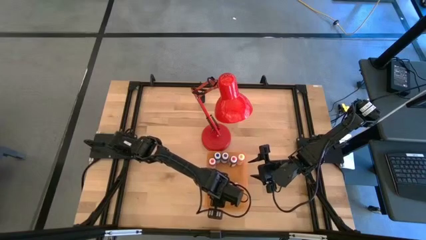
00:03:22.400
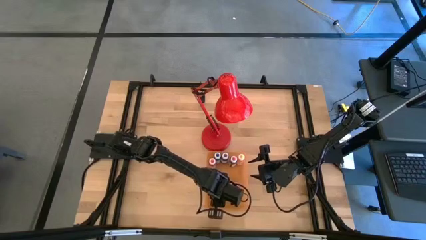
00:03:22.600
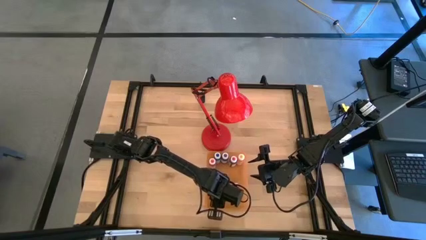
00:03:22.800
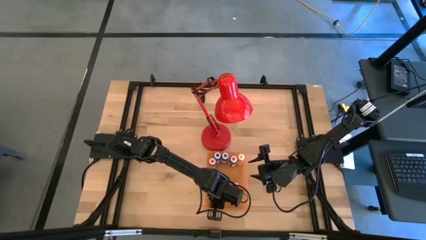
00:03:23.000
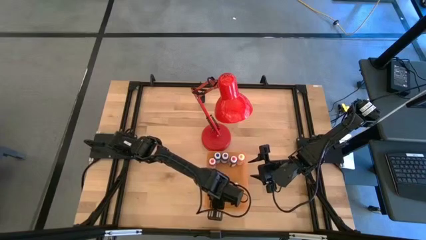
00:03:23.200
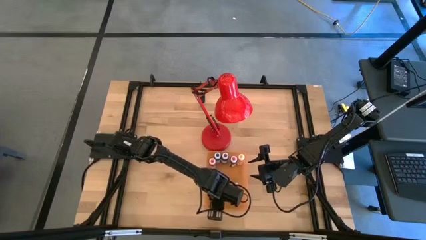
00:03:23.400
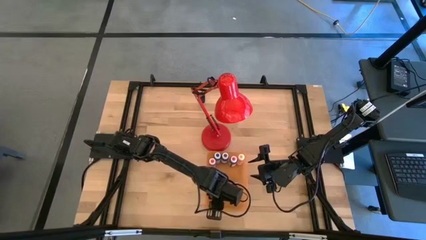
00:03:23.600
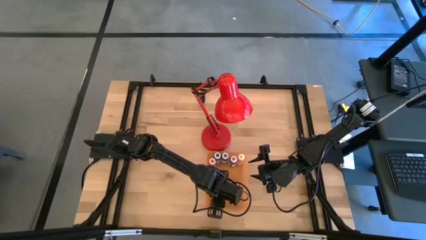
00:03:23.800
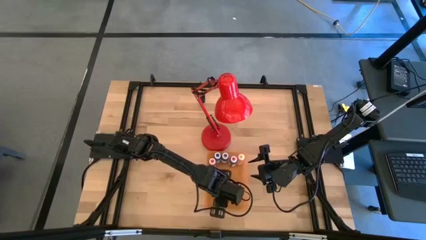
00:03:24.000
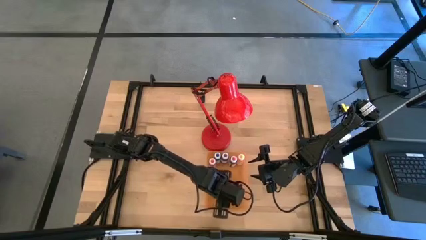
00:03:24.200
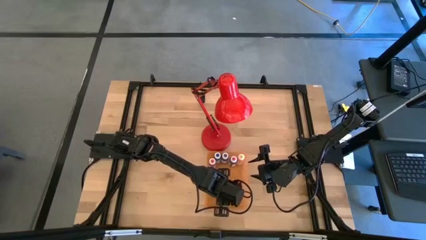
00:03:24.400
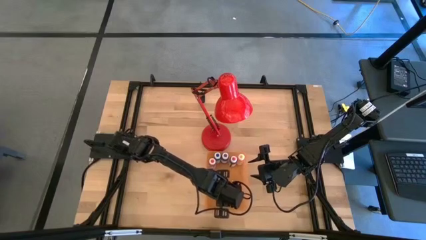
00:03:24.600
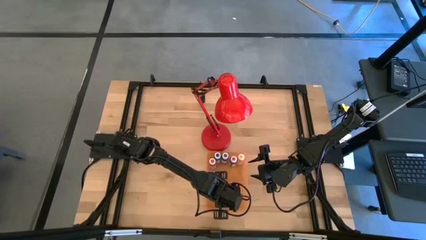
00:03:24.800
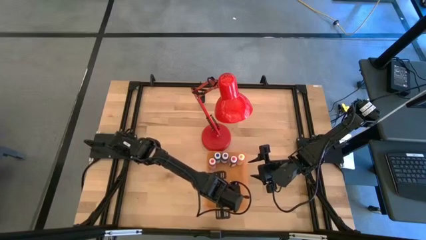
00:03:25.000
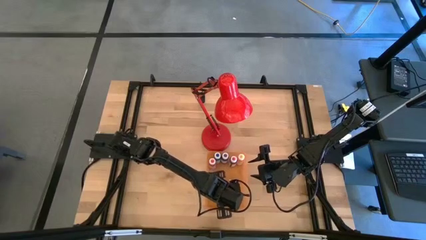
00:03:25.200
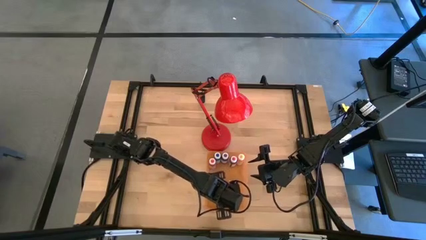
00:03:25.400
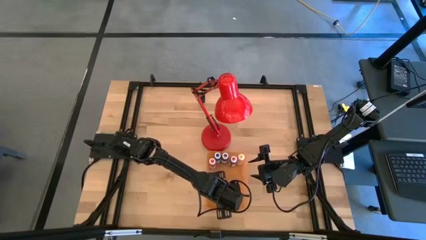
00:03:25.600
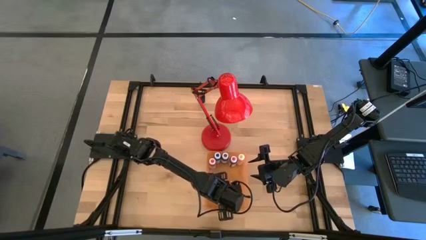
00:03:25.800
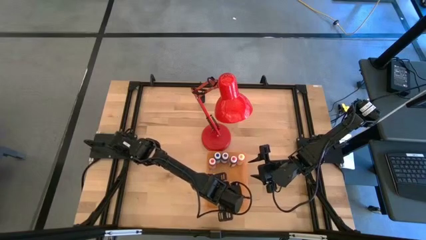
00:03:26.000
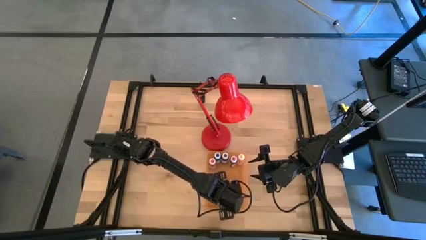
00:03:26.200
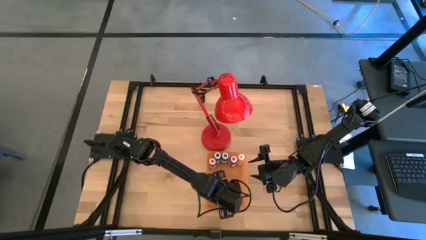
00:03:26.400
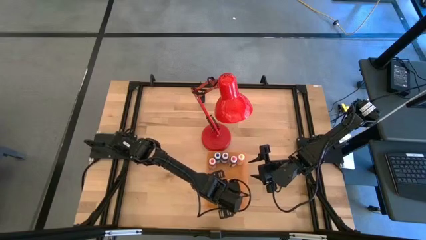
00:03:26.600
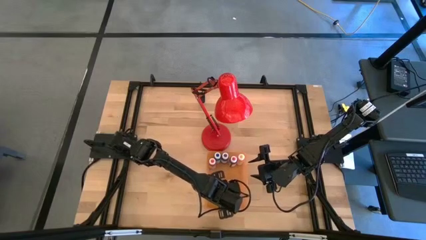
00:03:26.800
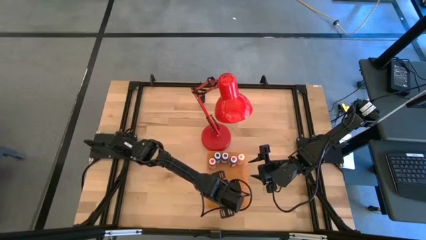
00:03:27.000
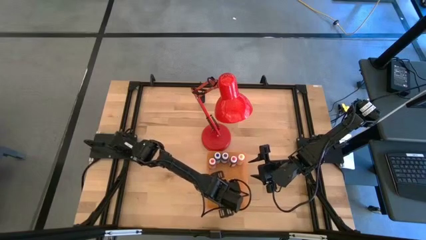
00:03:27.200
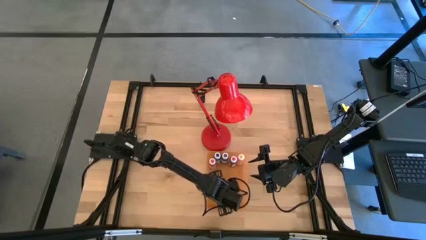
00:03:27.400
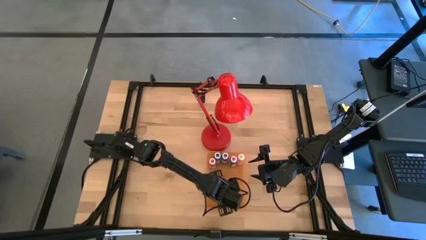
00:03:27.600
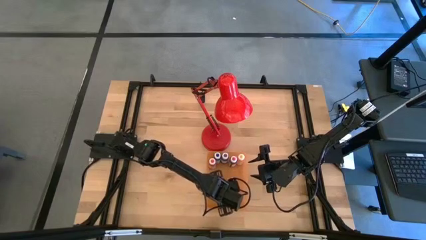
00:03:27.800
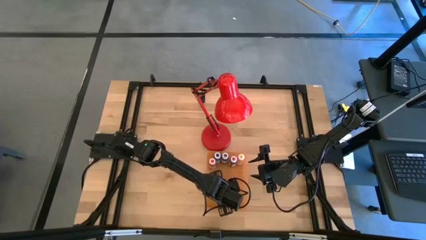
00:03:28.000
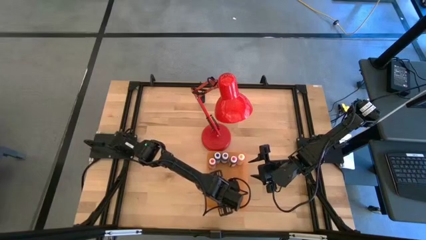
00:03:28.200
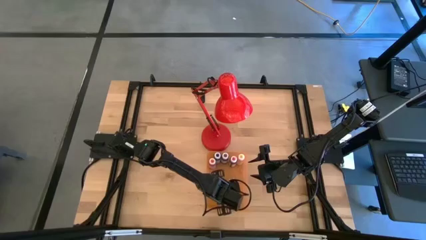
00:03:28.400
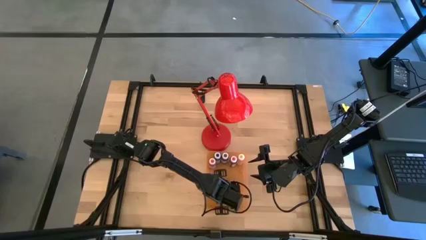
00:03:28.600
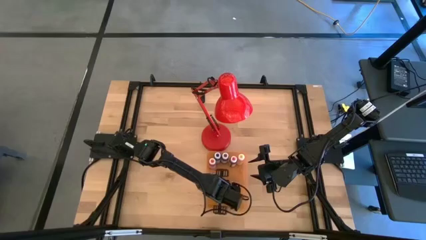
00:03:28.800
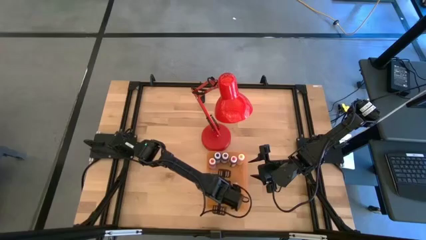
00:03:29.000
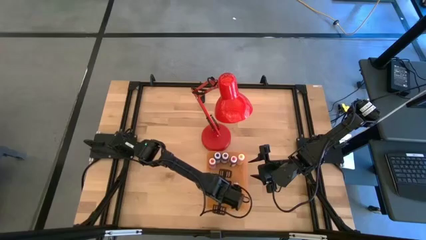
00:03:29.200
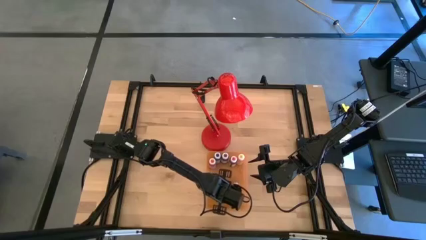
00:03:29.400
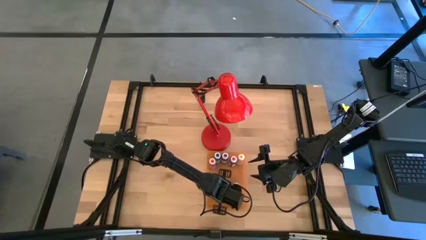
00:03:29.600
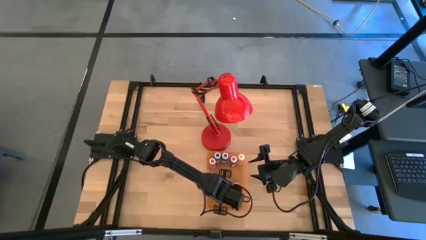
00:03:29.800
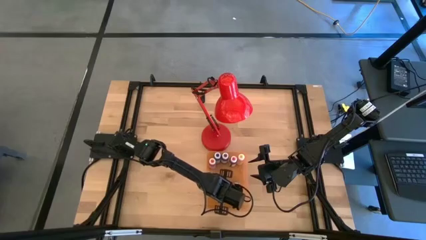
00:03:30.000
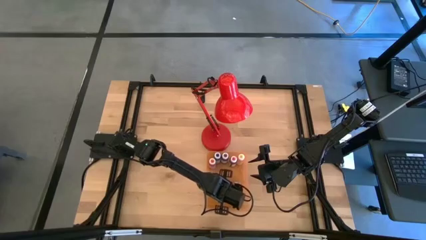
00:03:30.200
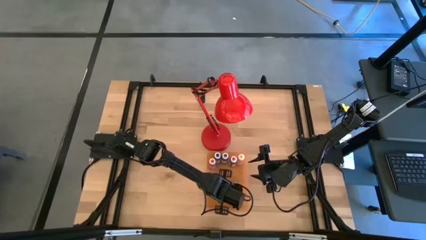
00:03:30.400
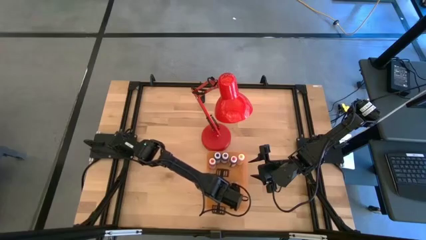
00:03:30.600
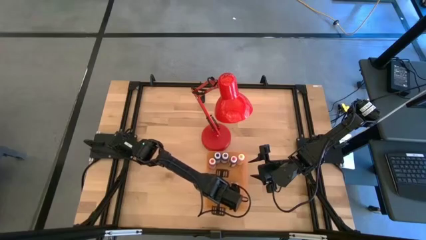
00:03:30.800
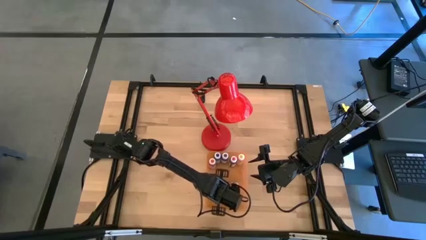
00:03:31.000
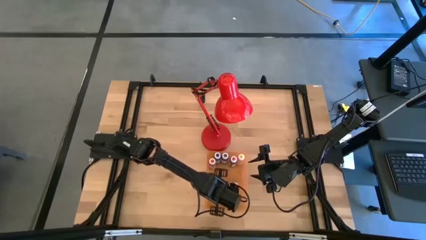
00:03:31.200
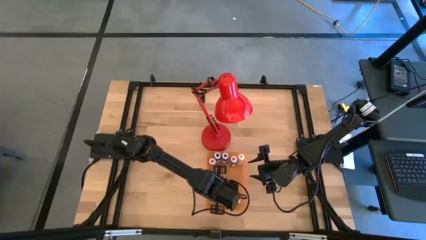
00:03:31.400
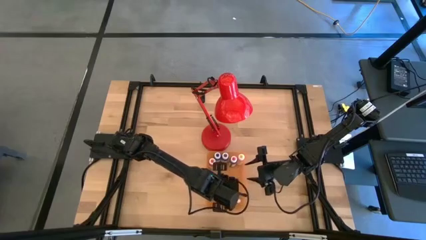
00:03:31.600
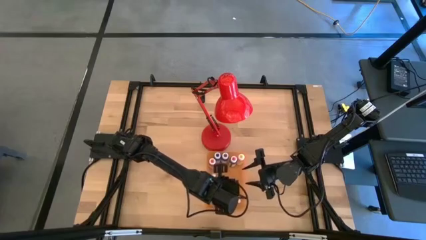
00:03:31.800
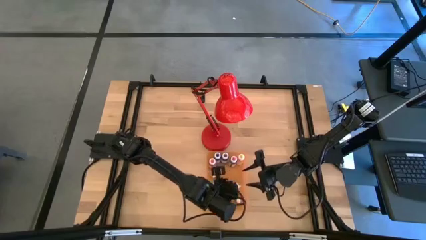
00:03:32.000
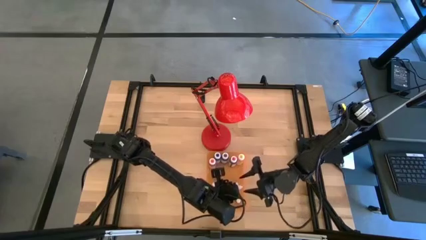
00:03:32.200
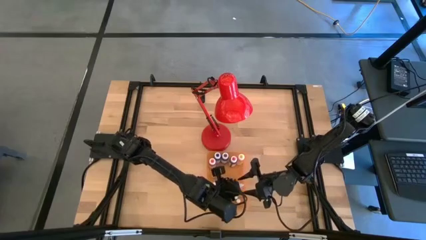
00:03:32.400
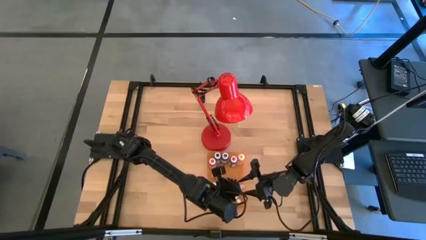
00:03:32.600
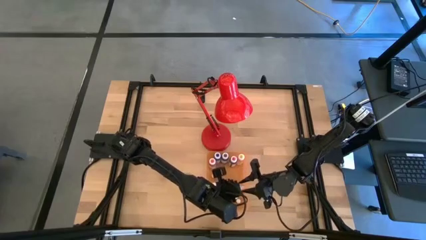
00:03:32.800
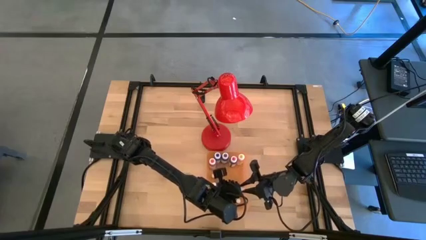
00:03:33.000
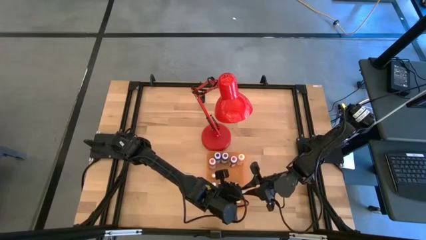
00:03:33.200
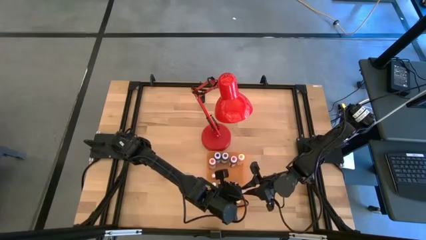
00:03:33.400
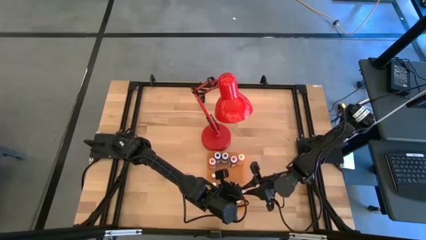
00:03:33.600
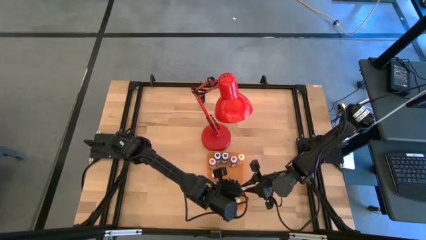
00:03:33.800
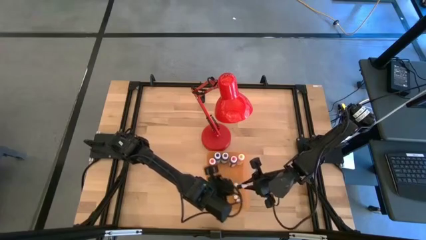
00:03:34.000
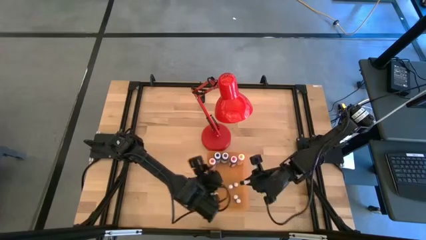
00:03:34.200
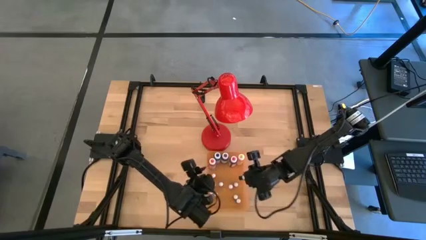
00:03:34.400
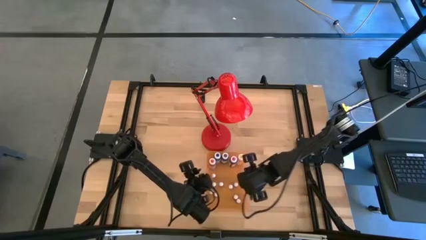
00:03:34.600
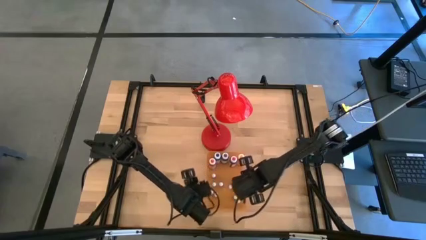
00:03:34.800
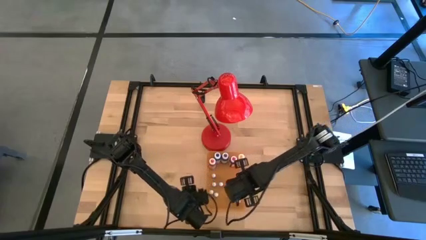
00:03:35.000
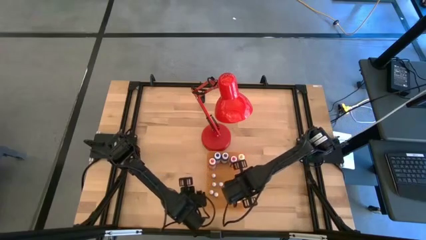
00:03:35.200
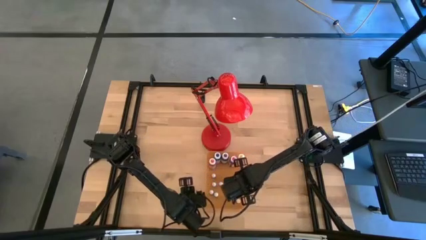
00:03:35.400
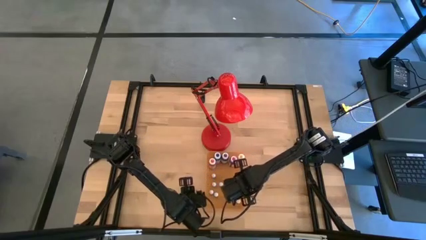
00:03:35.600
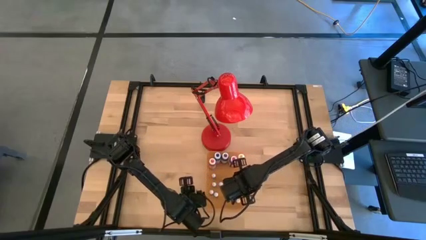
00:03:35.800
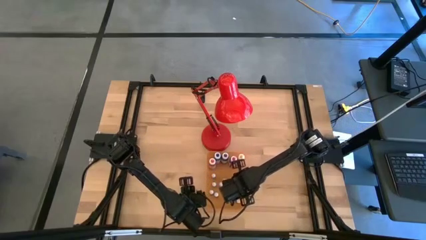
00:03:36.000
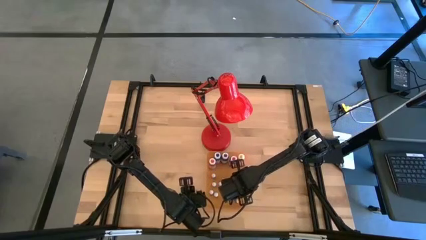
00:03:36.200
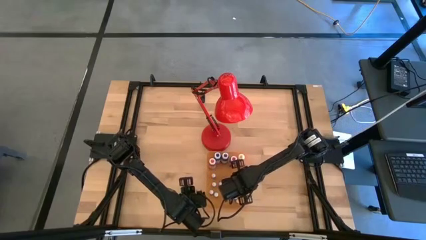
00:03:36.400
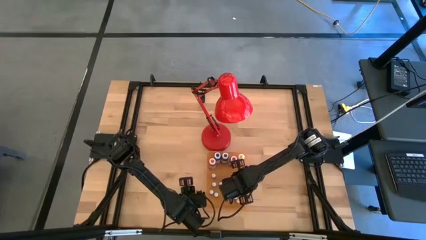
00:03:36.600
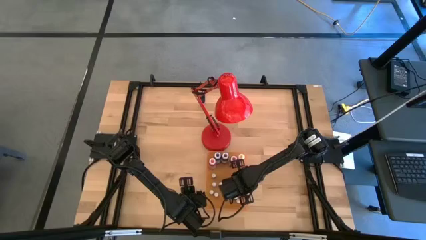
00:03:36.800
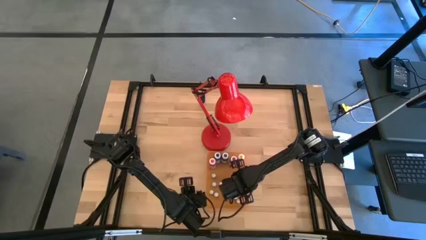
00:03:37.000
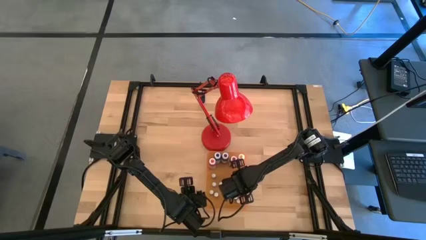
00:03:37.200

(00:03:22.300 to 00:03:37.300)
Task: Pick & Place food coloring
Put the green food coloring bottle into the orange bin
